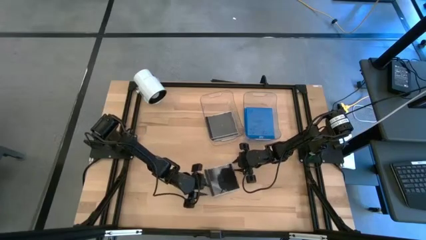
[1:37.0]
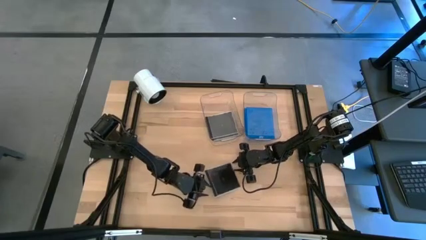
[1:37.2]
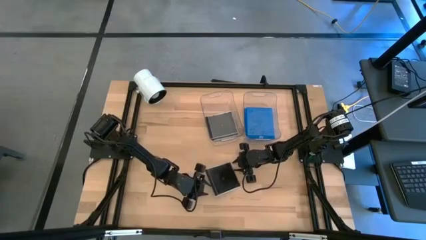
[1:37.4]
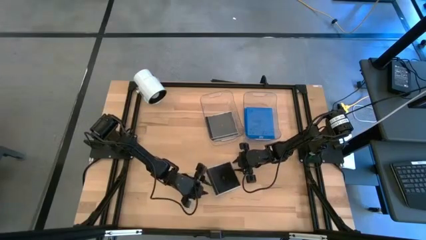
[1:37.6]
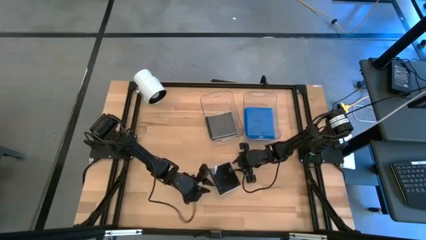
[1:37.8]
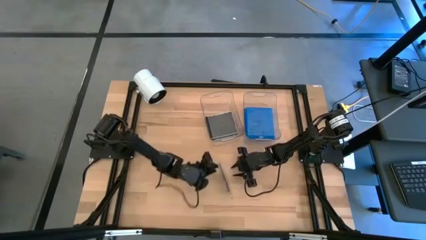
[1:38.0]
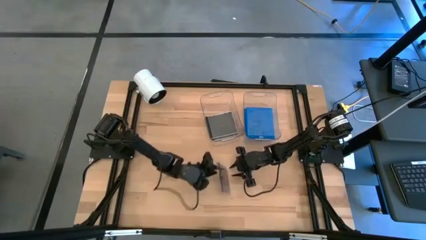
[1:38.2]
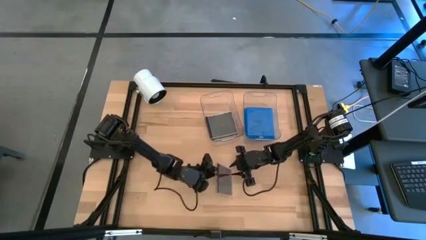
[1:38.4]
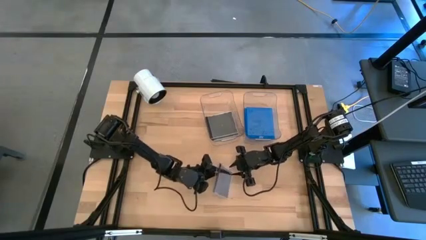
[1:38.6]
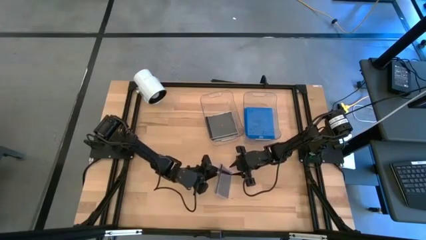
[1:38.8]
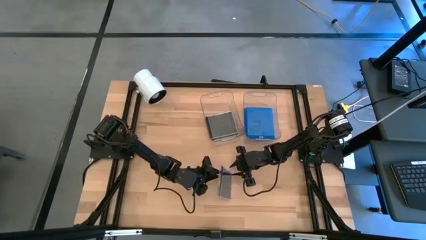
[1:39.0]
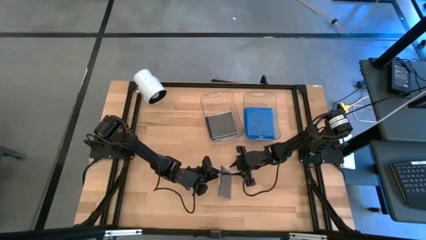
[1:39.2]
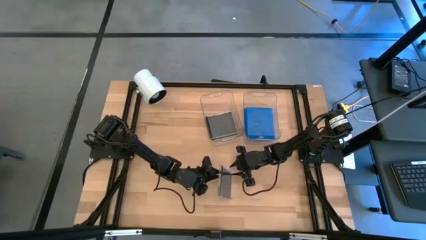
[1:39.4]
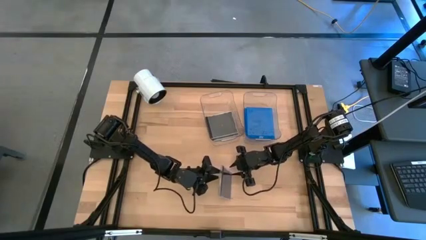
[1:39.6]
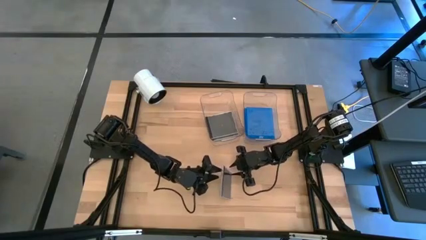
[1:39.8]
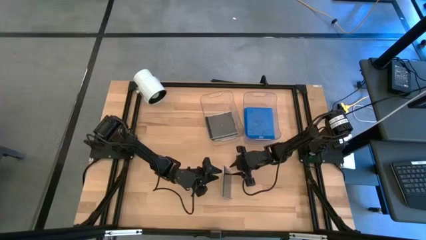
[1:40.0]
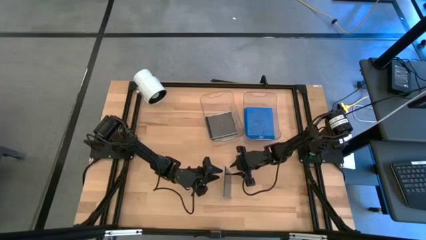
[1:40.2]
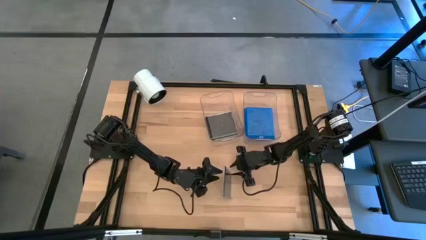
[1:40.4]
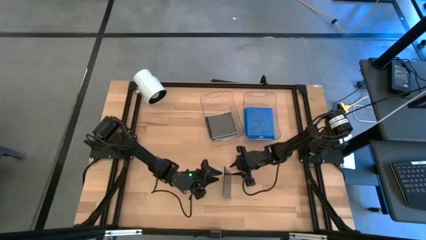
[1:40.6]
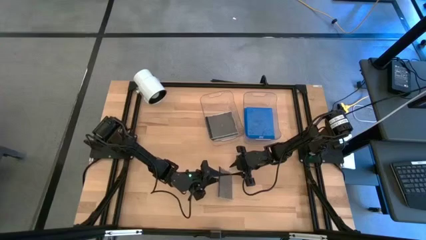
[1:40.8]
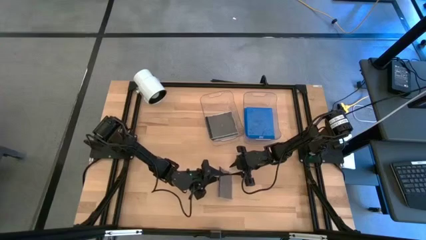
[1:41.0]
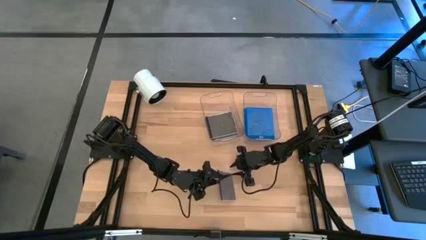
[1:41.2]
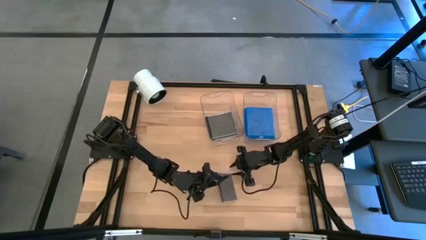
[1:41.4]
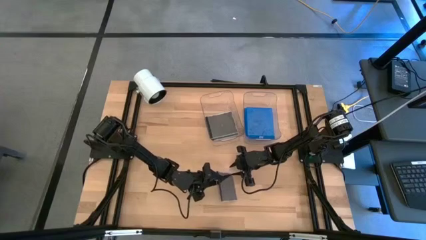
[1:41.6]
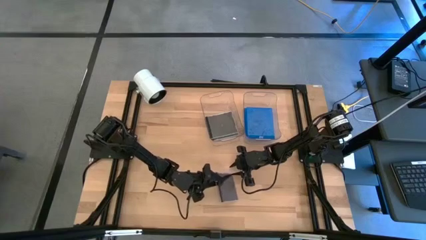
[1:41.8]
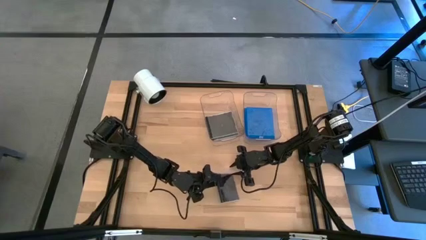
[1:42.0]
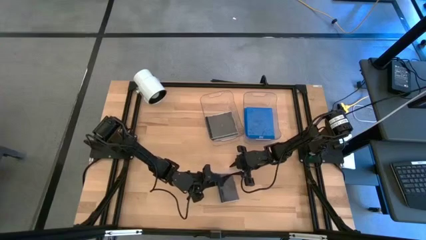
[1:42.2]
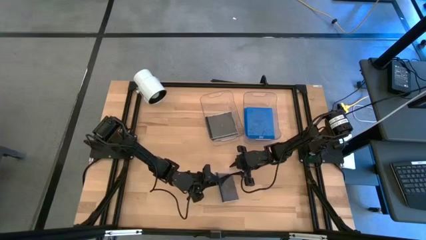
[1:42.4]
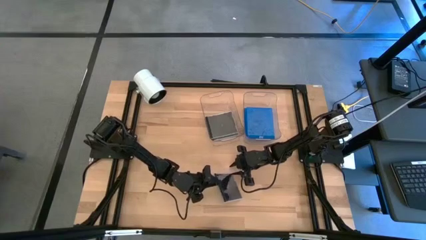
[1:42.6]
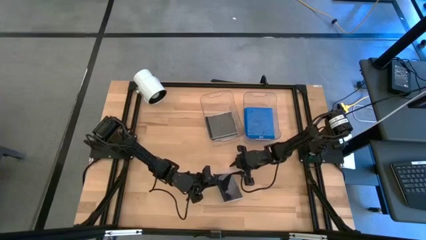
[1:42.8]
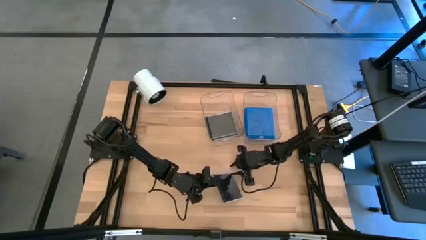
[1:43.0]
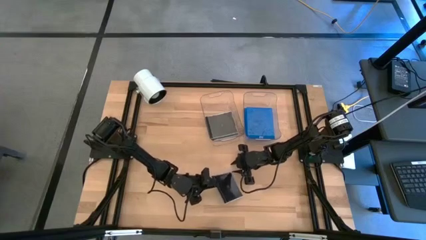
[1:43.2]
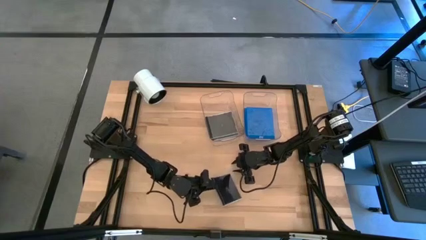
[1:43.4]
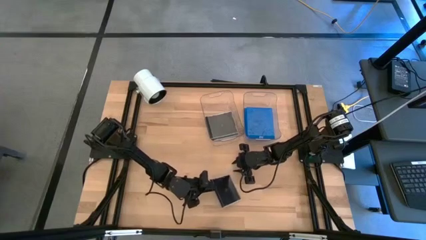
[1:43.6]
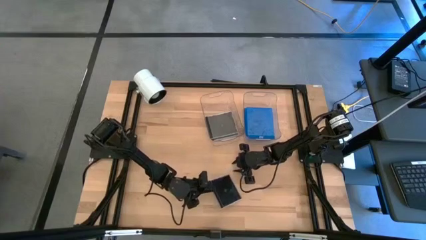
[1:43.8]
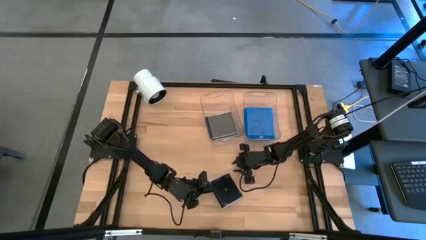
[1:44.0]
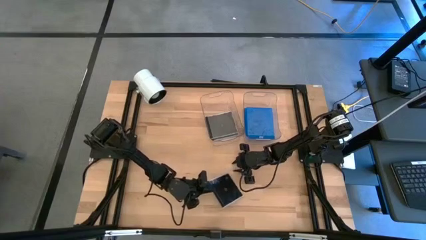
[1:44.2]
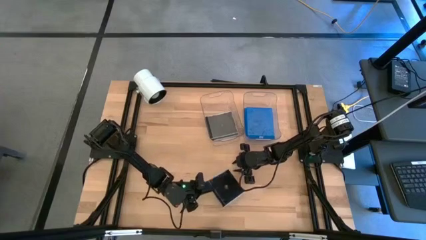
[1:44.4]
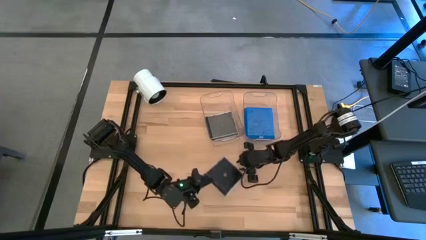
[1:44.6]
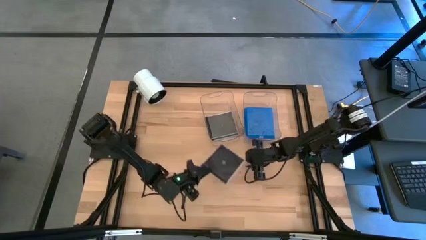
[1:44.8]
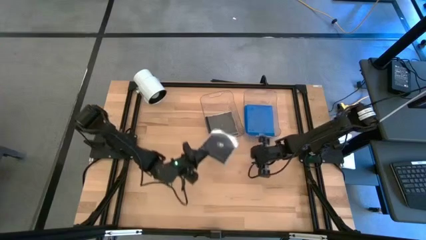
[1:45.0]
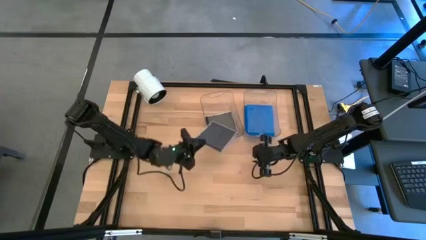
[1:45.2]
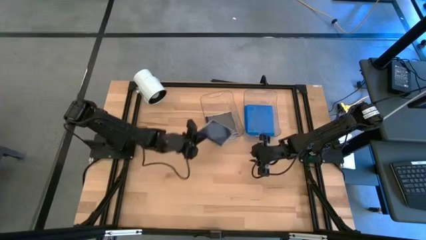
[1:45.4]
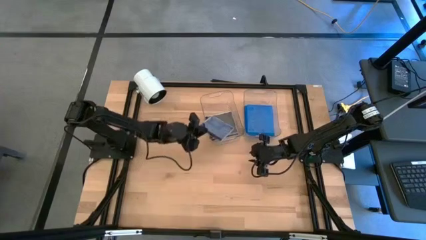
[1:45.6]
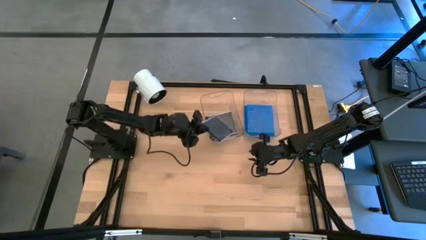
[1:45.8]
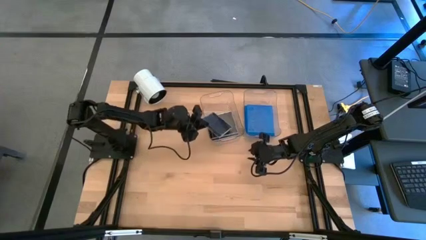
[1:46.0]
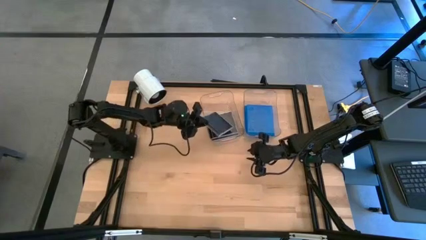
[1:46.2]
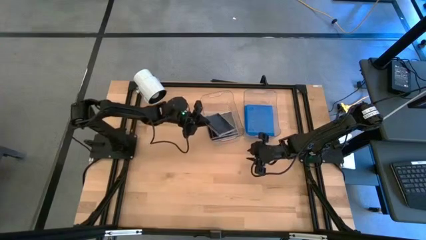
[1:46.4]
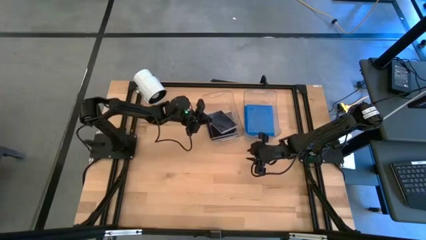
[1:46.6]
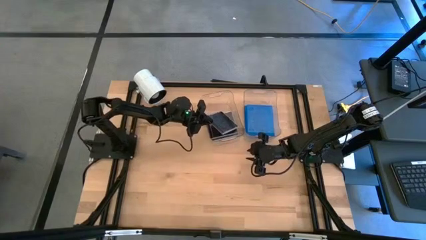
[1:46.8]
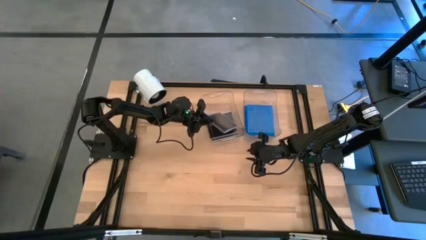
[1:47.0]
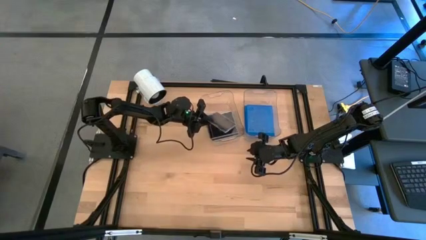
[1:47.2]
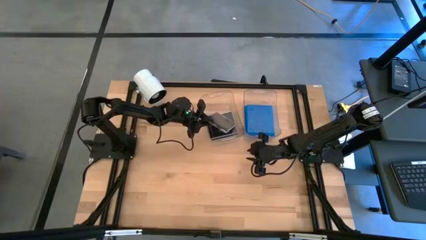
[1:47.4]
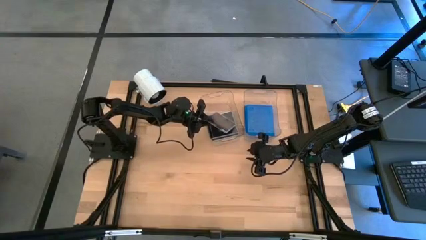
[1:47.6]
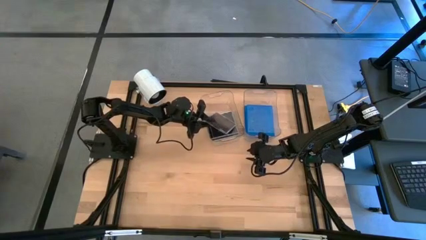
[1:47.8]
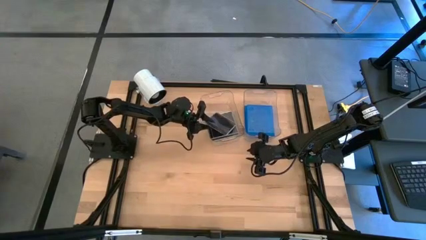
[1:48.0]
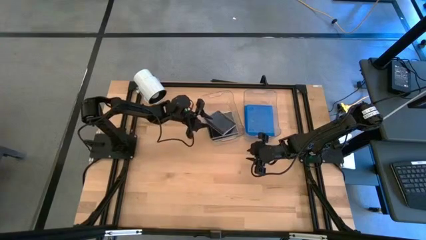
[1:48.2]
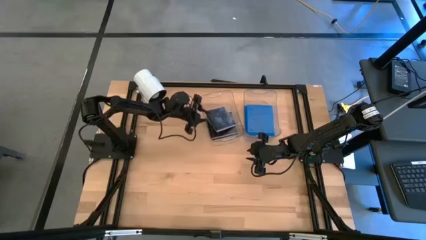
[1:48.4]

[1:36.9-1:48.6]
Task: Pick & place jewel cases by type
Put the black cd case into the left transparent bin

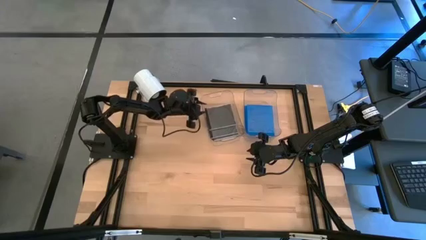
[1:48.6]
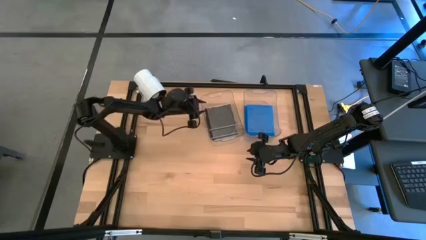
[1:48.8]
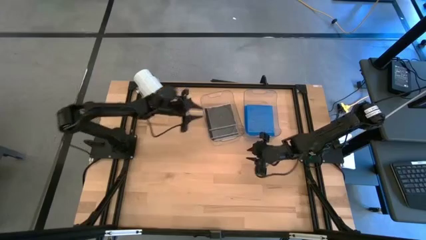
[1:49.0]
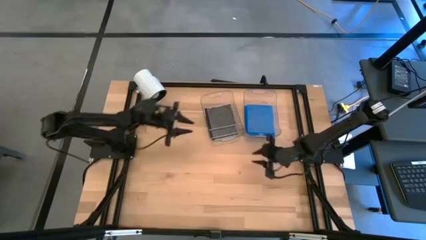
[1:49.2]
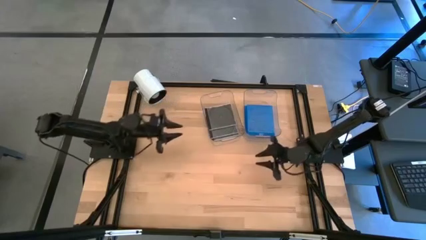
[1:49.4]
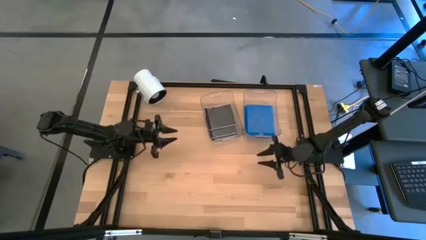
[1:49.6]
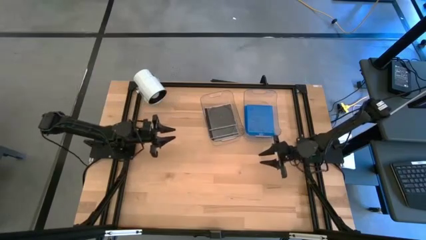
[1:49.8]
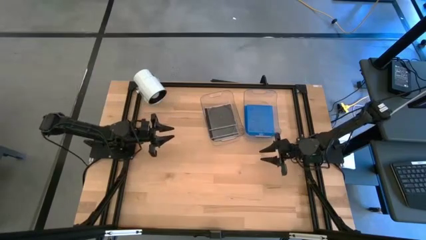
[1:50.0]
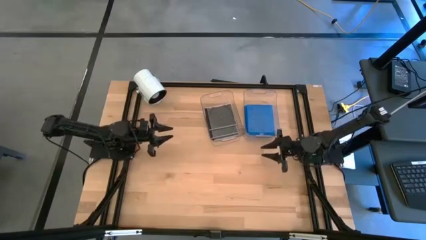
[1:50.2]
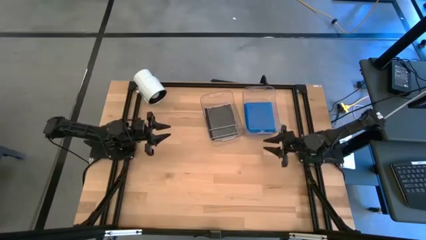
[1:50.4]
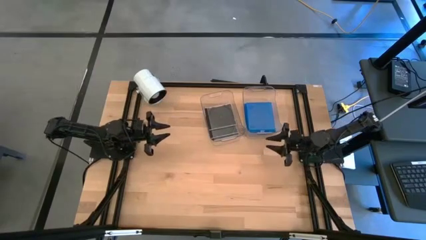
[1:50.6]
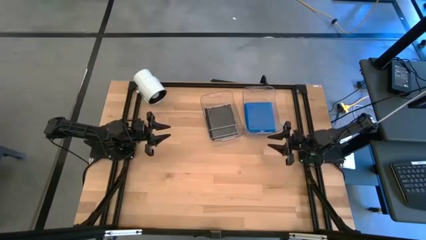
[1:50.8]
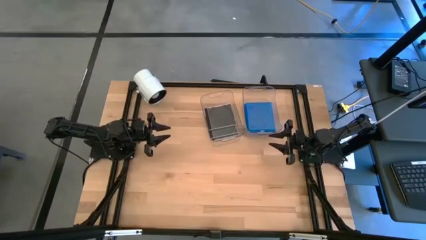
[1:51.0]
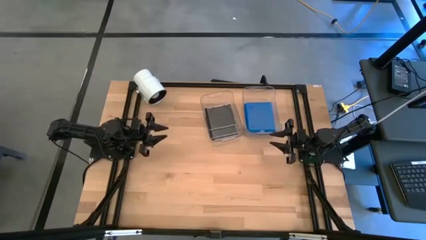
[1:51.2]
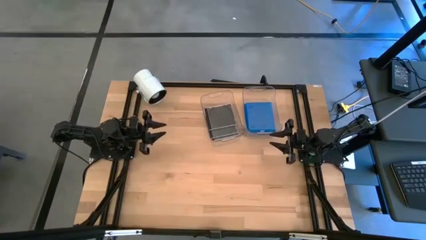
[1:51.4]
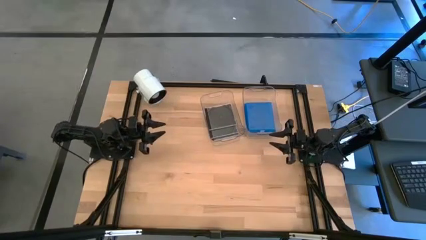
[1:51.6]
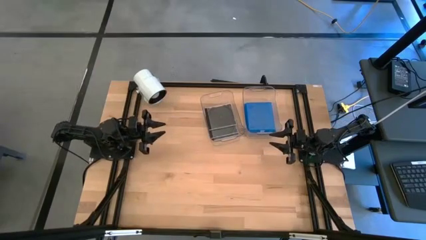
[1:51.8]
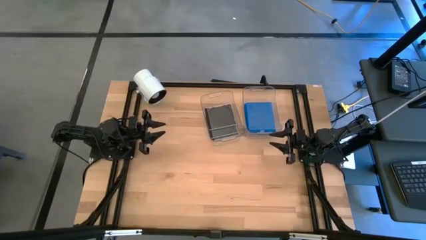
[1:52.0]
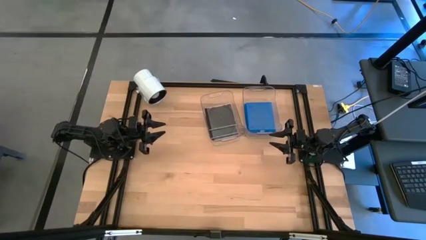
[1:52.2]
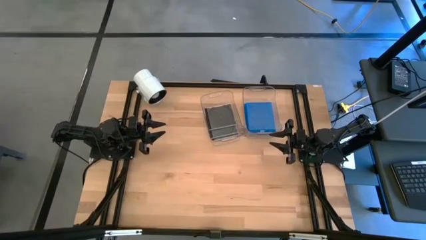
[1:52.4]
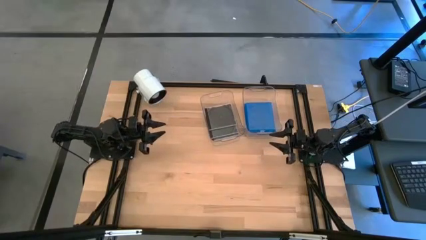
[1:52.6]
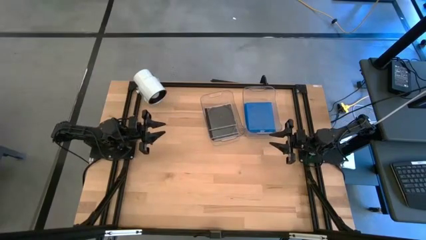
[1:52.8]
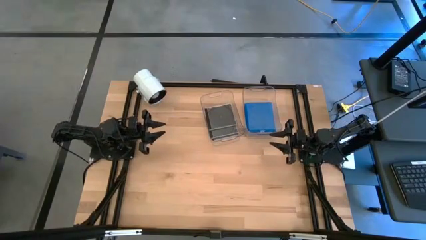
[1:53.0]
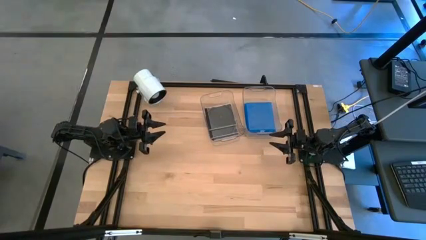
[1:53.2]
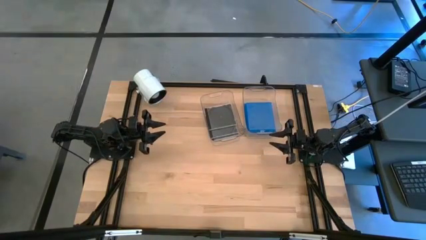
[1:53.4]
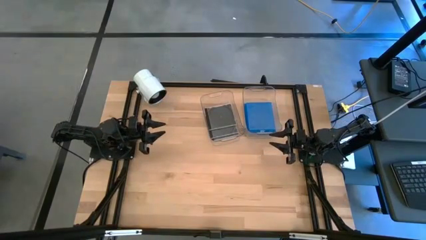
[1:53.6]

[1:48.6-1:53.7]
Return to Home Position
